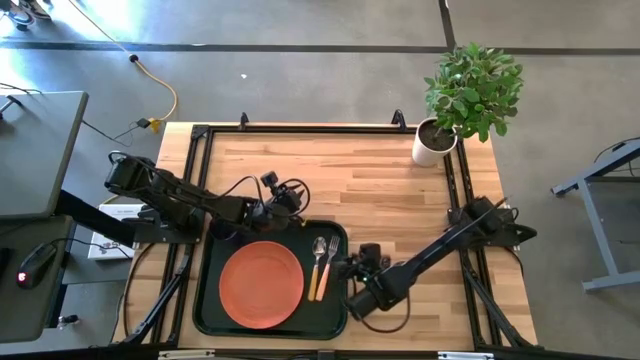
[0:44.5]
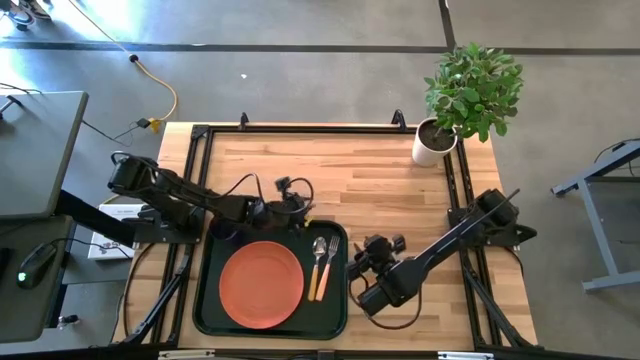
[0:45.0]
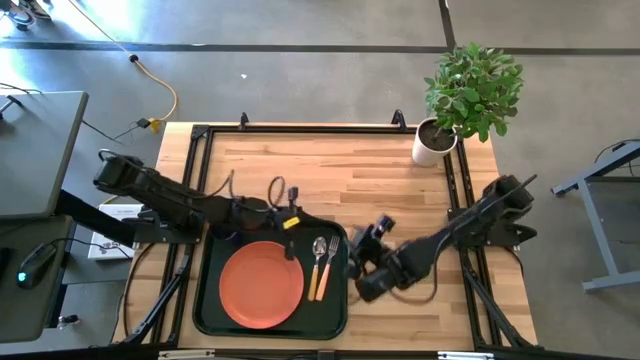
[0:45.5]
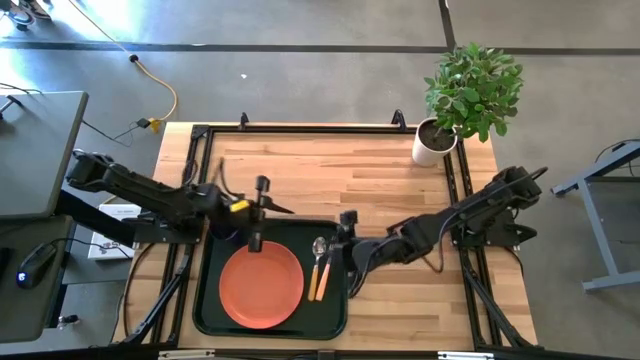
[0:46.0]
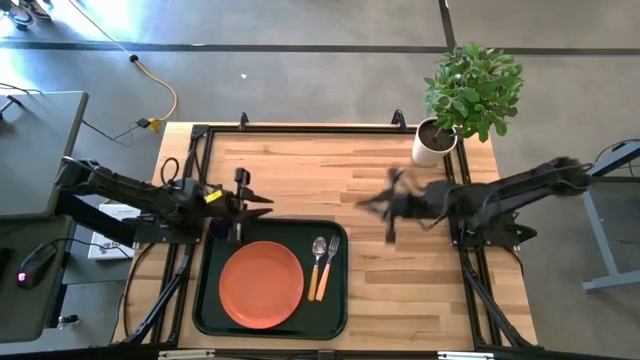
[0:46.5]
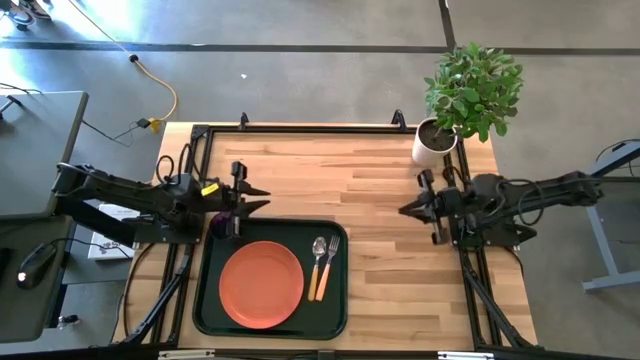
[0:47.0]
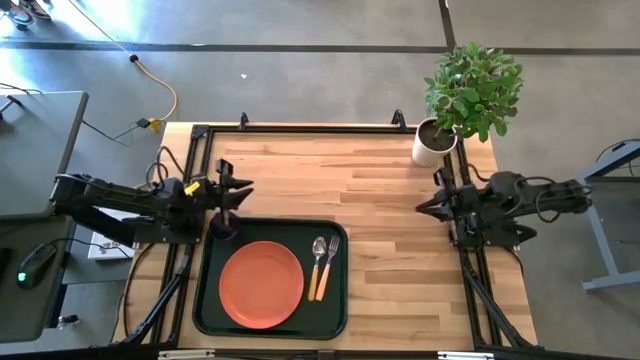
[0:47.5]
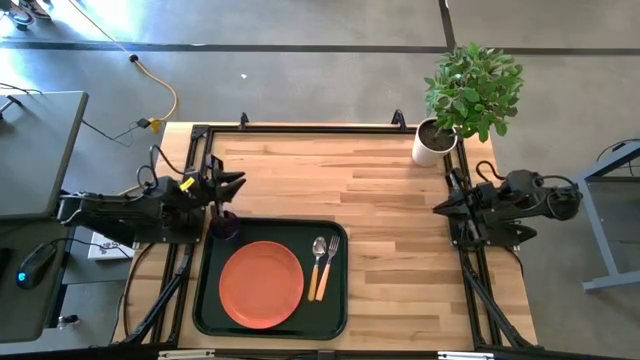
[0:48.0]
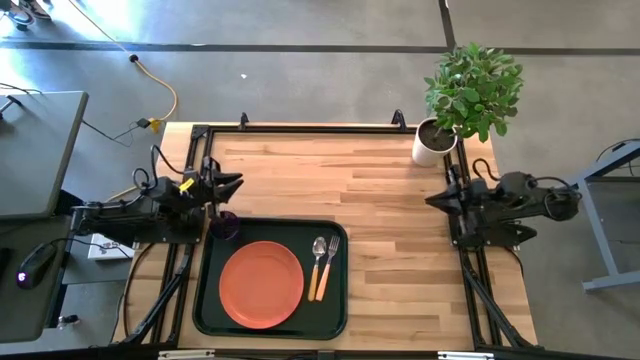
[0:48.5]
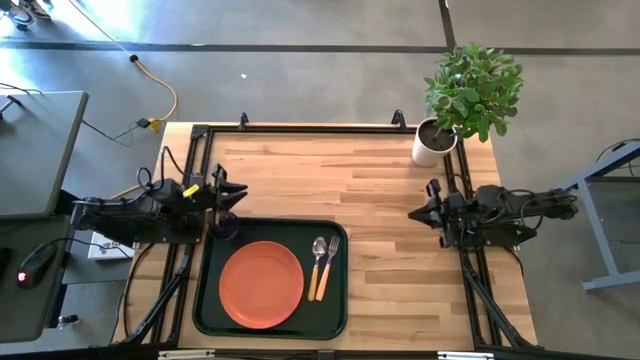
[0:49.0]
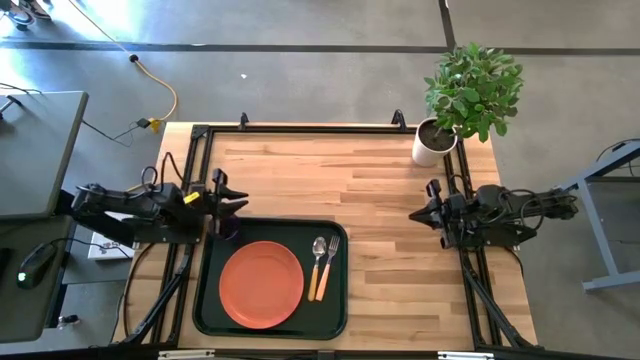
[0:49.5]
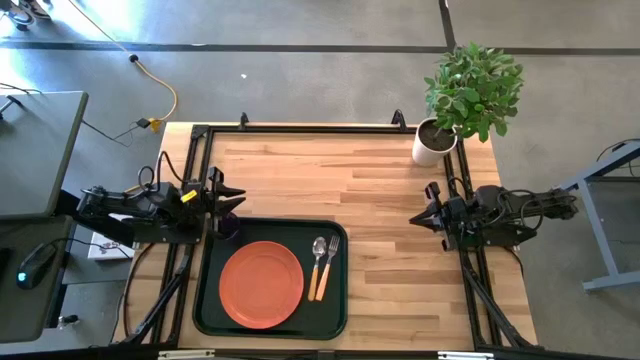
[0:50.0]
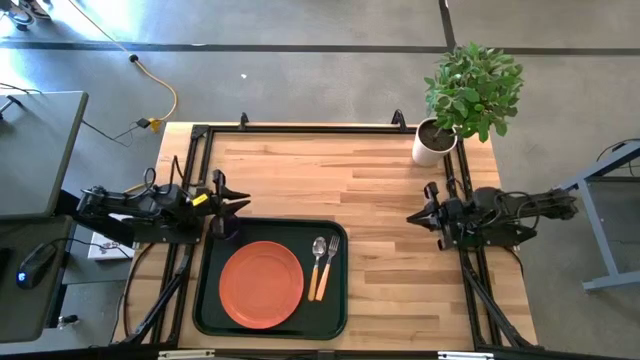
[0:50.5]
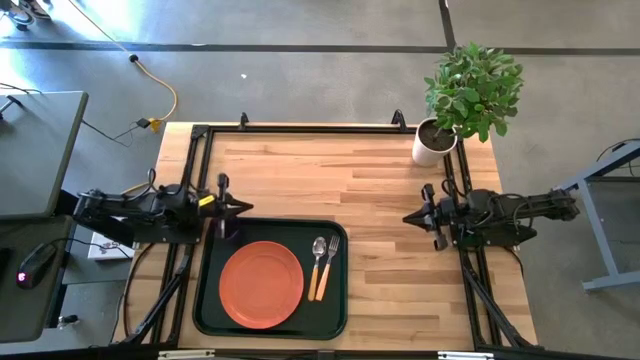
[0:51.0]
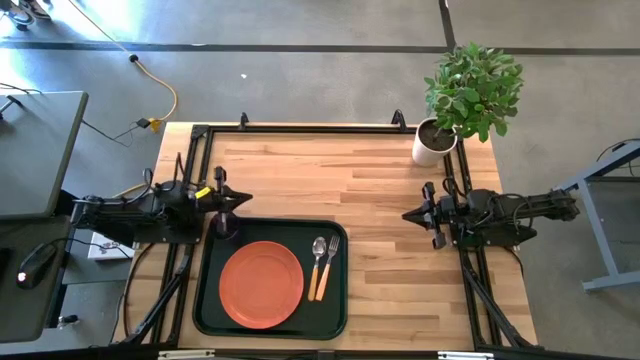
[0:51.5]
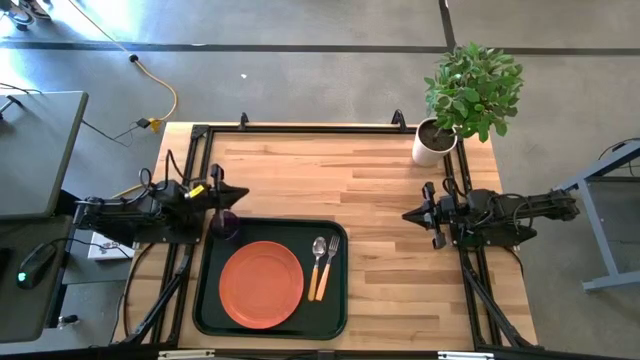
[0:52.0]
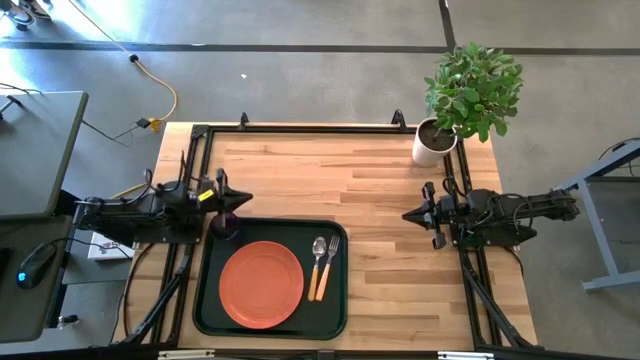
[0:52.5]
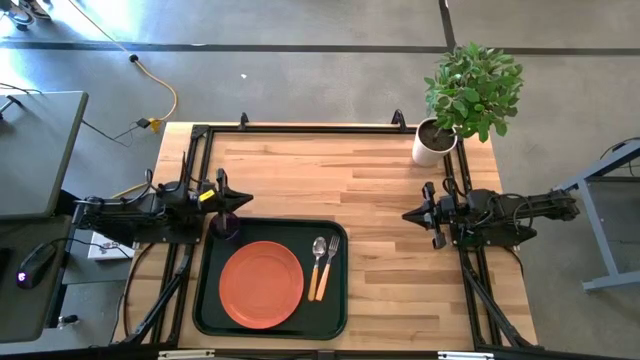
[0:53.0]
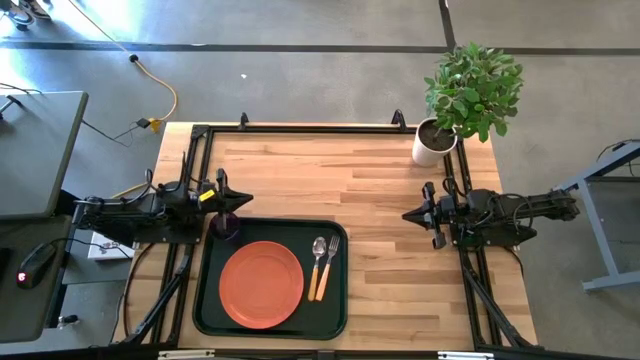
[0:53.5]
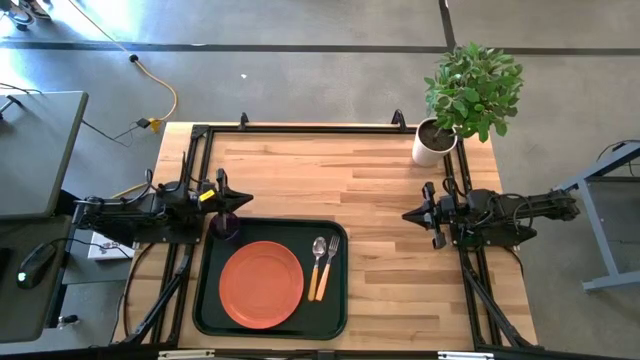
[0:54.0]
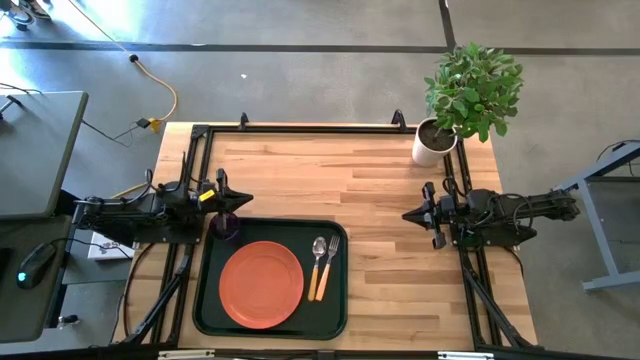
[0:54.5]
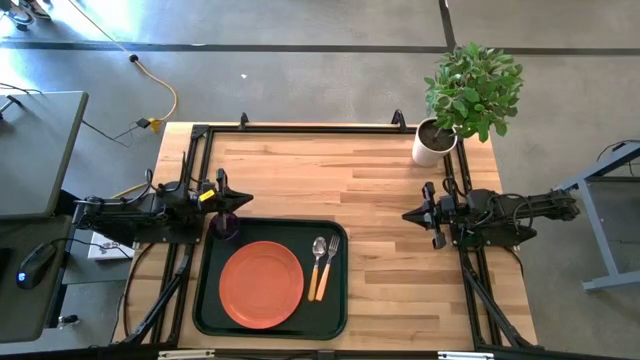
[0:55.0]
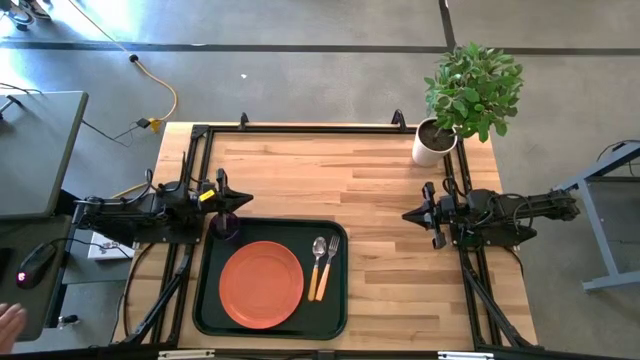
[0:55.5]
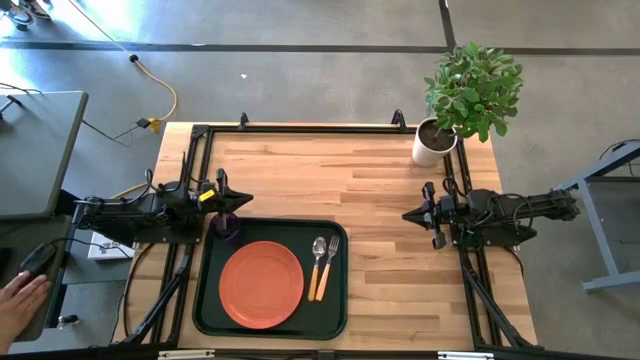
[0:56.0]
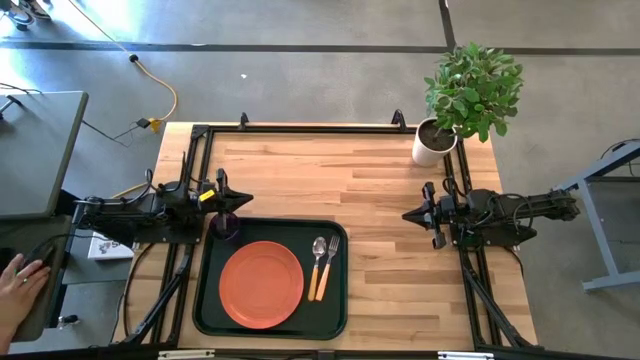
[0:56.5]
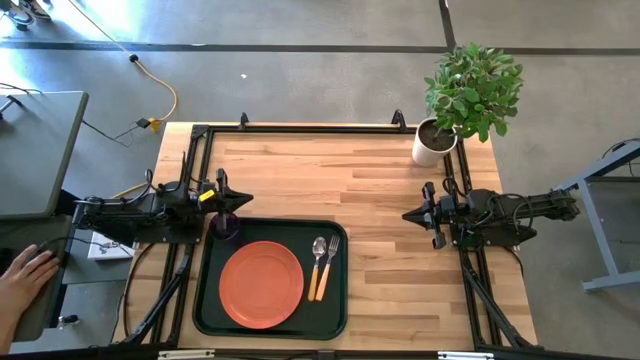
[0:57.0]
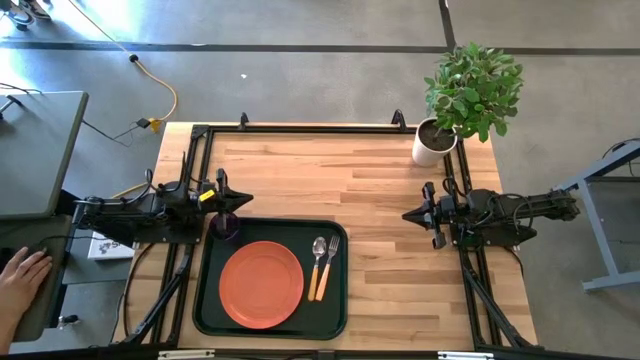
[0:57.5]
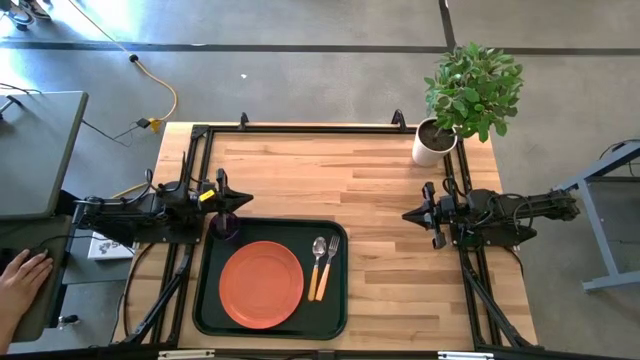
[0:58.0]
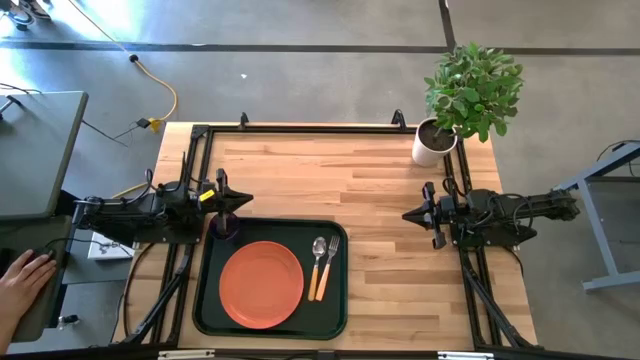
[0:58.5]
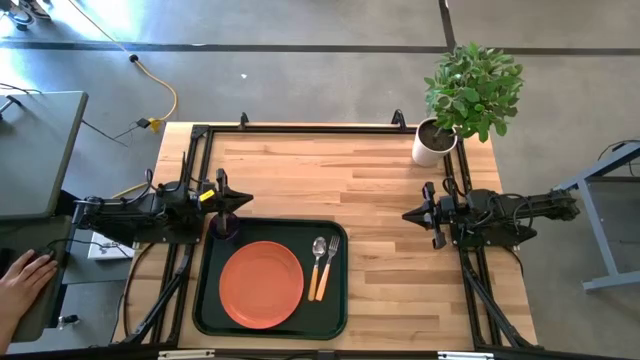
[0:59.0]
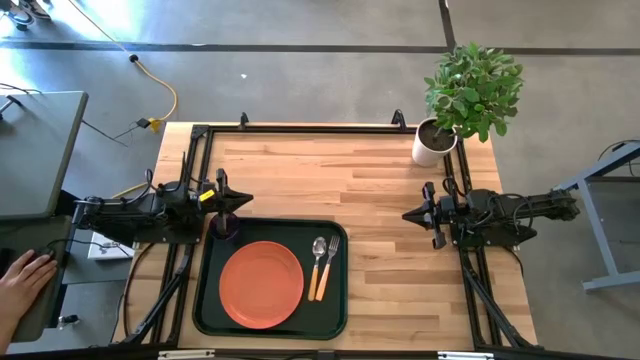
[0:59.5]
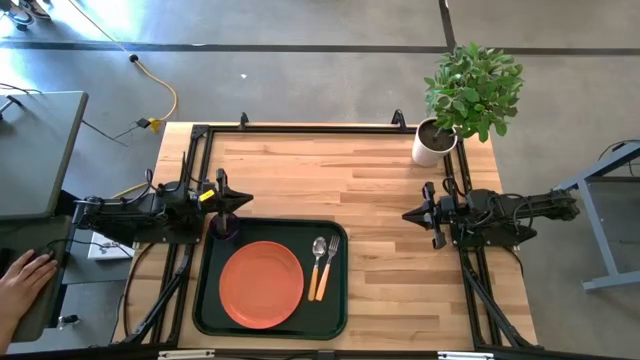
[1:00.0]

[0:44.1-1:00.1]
Task: Pick and place plate/cup/fork/spoon on tray
Return to Home Position

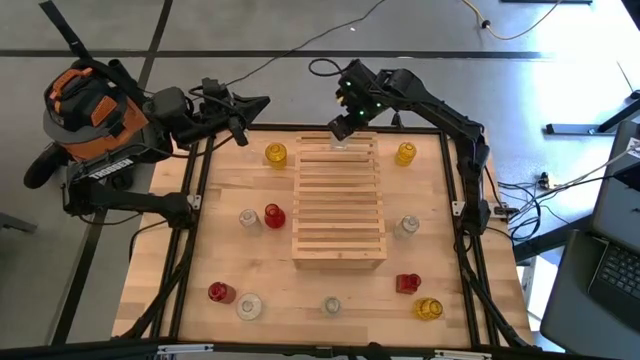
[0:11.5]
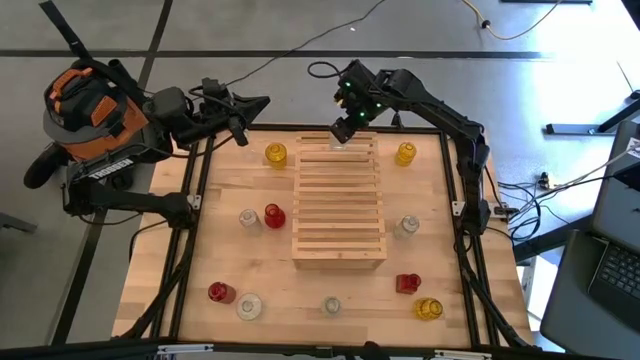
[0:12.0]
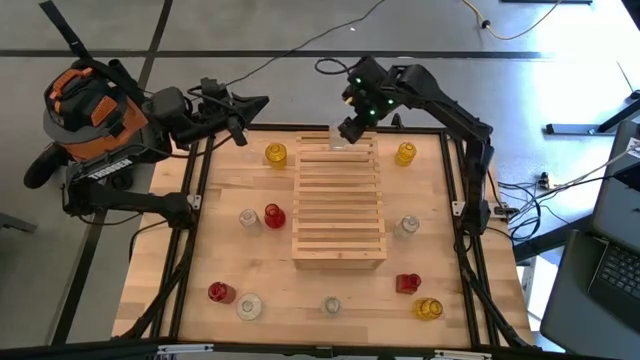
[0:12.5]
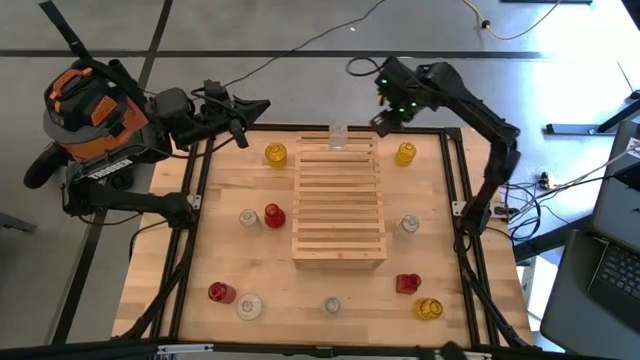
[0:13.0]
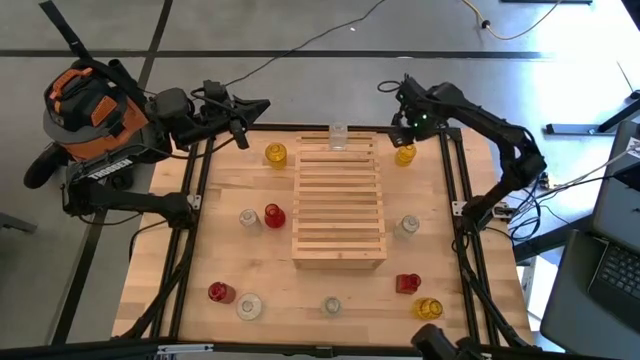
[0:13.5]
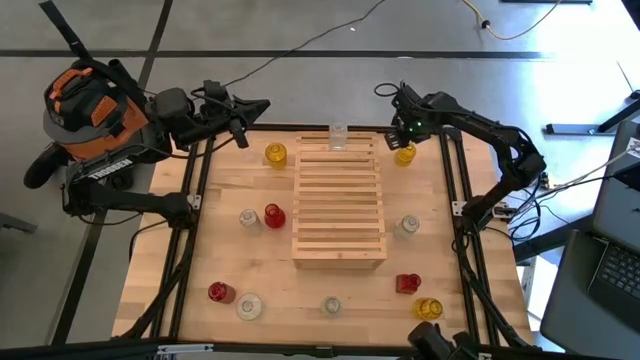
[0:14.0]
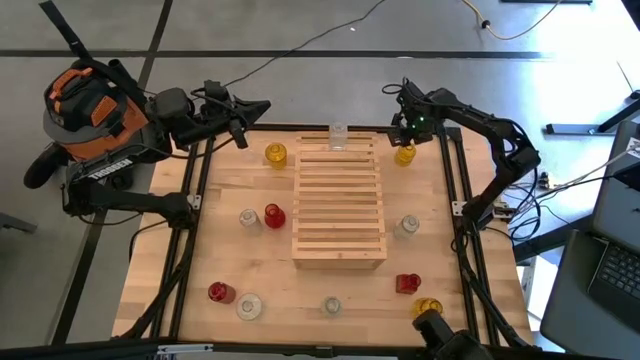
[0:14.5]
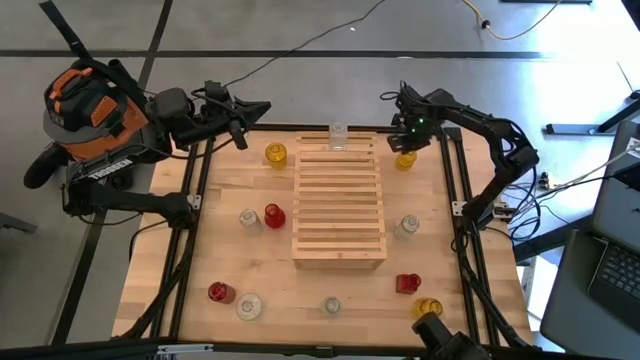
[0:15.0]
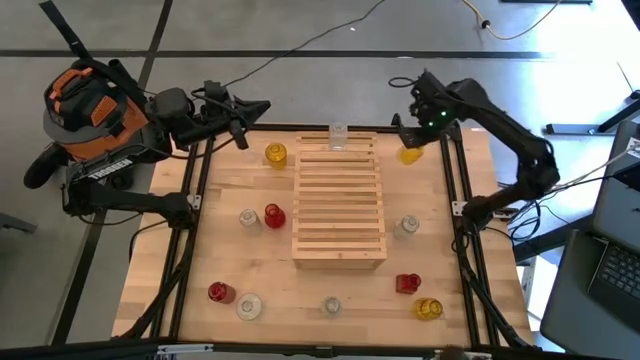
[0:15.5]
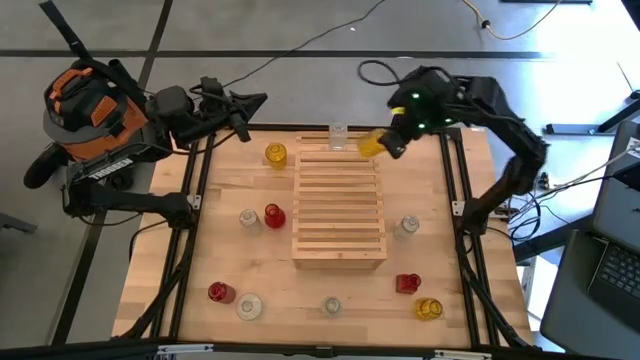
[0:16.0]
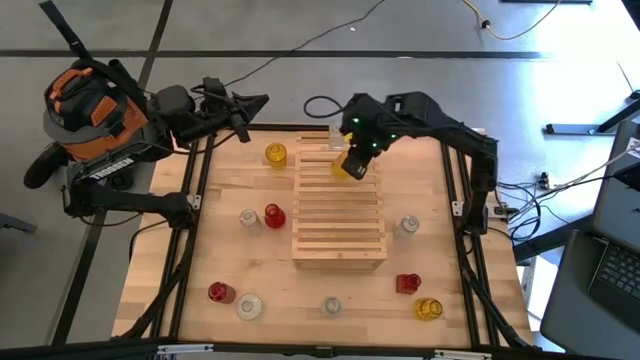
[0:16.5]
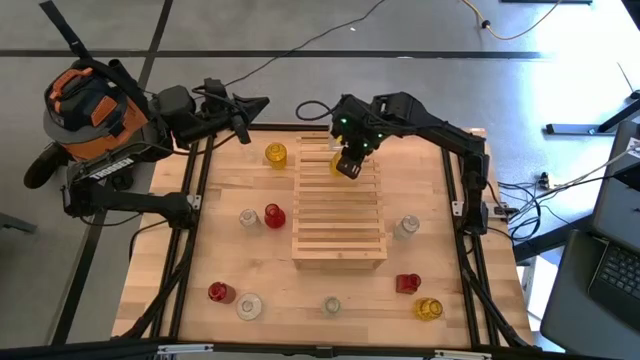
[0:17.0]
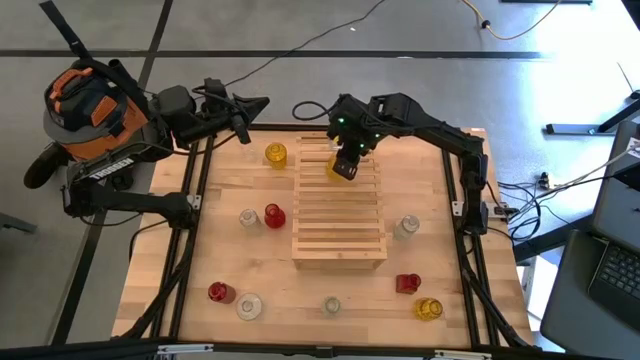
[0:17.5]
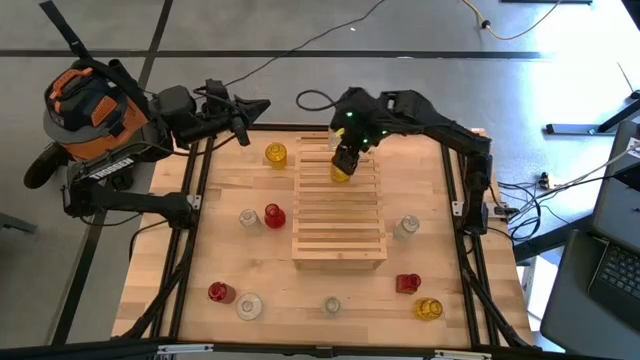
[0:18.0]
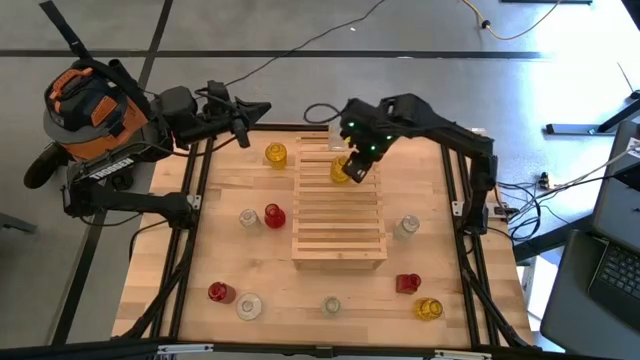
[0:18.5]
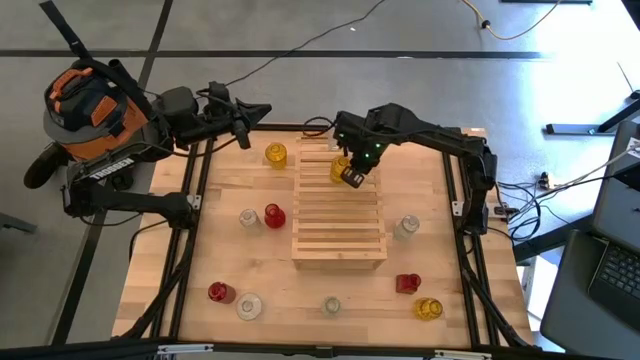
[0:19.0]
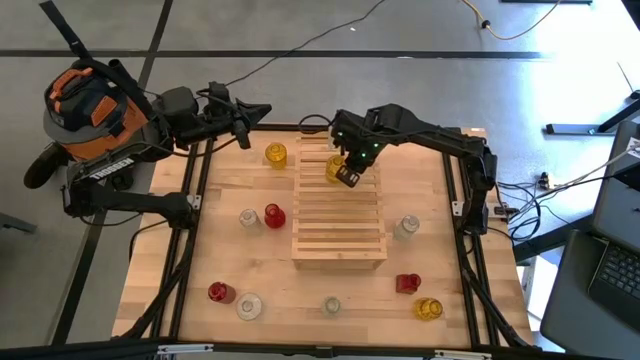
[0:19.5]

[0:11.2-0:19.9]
Task: sort vases onto shelf
Put the yellow vase on the shelf
